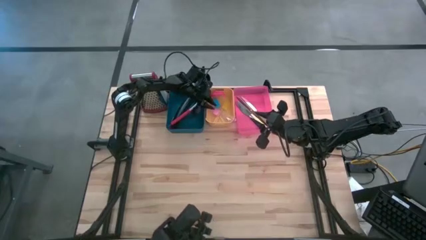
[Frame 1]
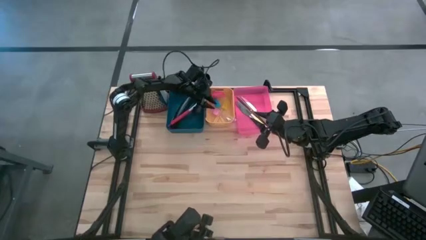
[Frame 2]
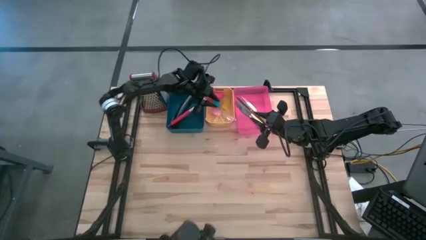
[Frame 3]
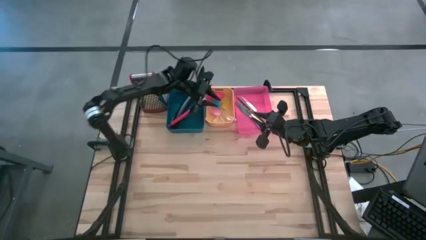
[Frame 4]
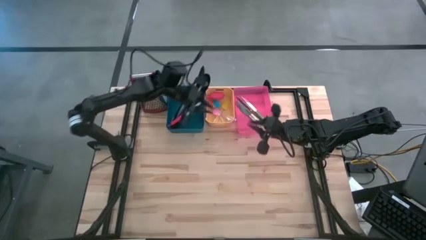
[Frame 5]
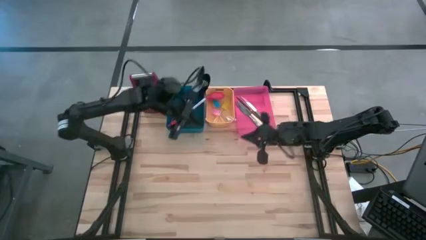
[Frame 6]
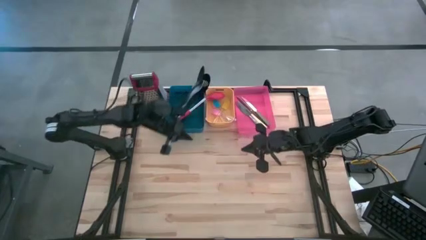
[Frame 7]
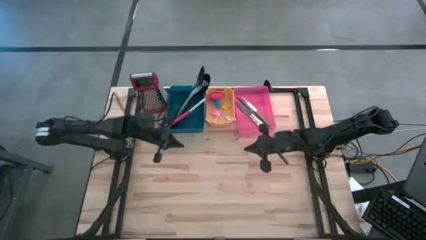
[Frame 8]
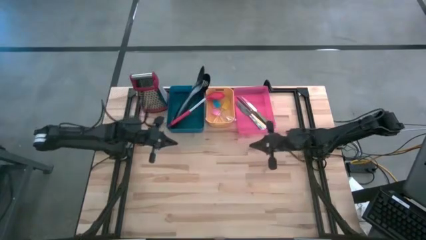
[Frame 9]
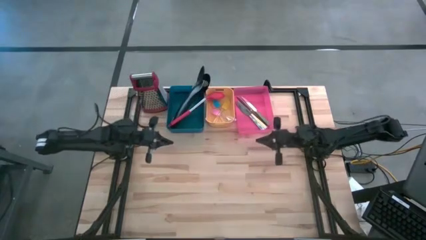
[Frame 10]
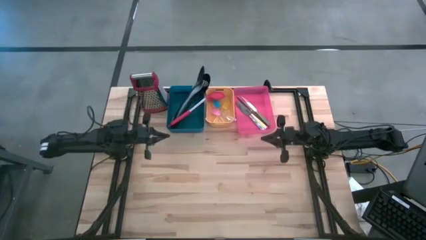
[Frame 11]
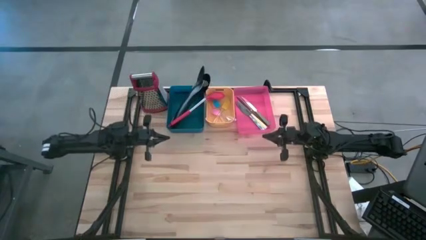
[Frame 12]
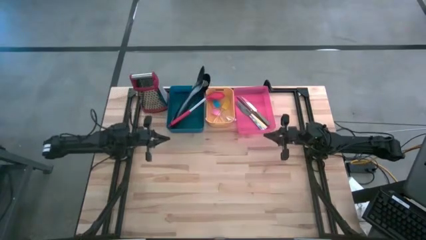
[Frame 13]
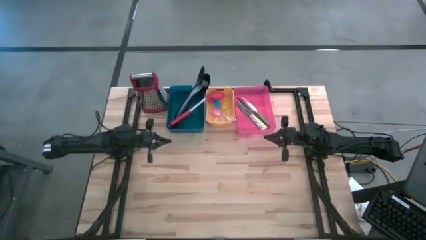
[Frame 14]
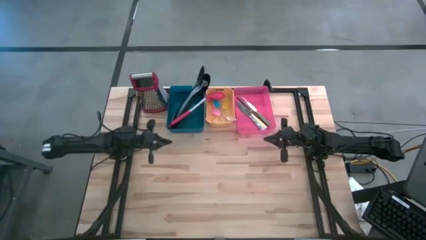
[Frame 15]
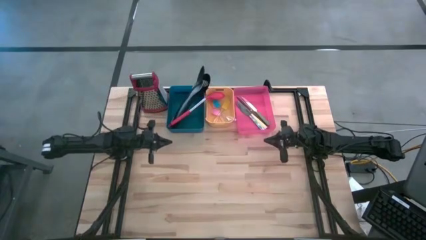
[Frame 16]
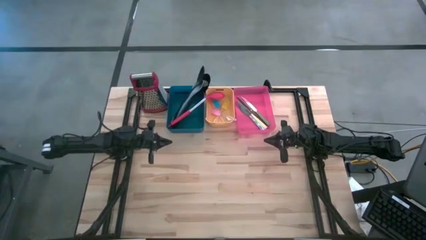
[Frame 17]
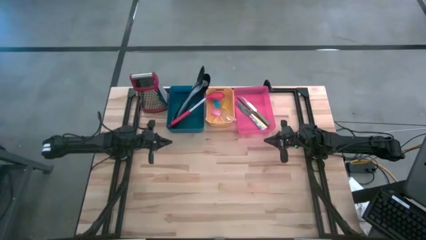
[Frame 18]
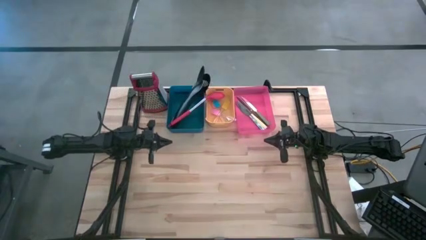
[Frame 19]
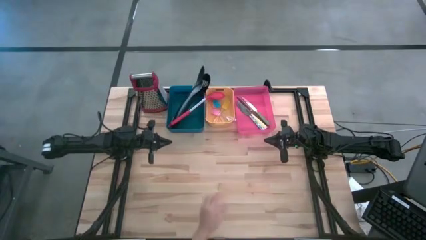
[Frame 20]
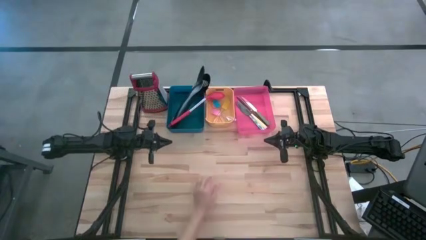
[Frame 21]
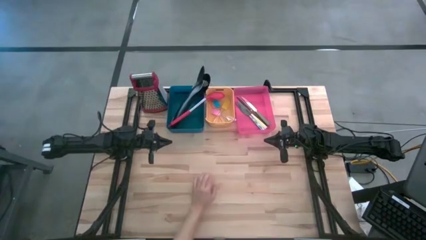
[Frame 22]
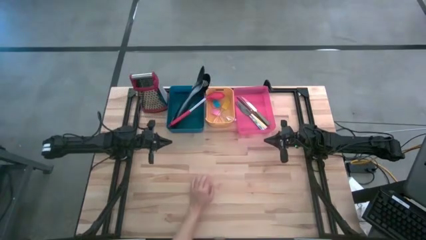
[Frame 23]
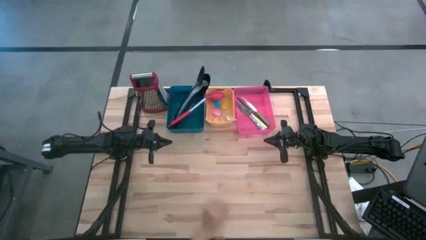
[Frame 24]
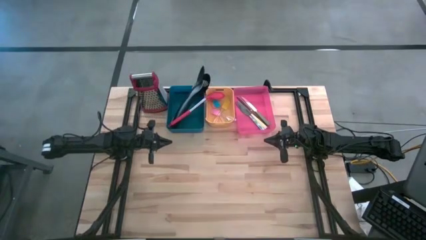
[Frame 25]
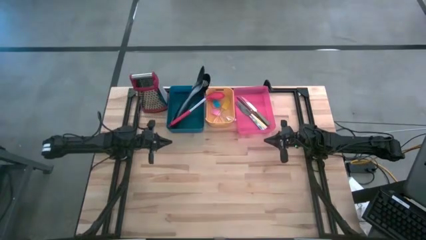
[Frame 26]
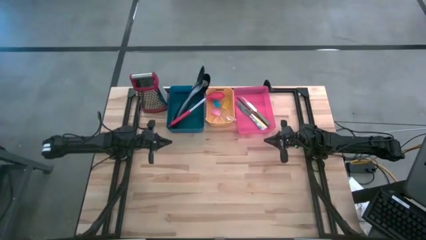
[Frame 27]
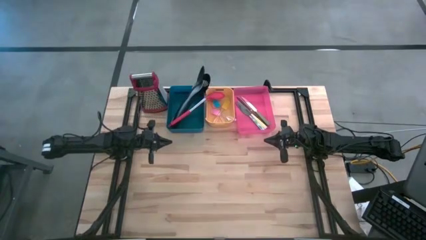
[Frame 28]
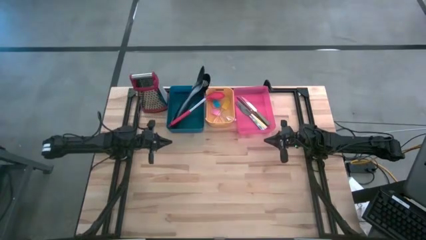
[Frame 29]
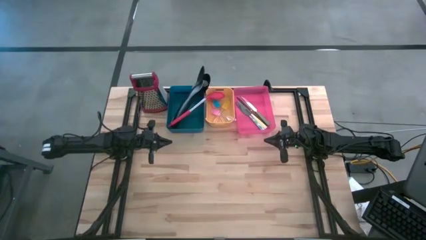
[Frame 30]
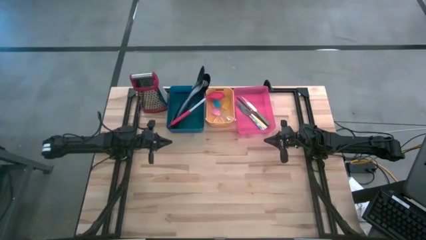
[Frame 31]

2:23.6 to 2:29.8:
Task: Pick & Place Kitchen Items
Return to Home Position

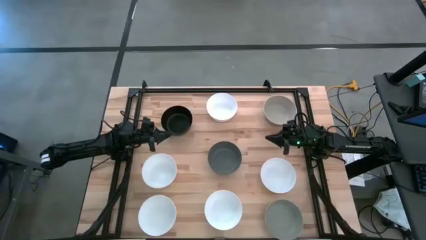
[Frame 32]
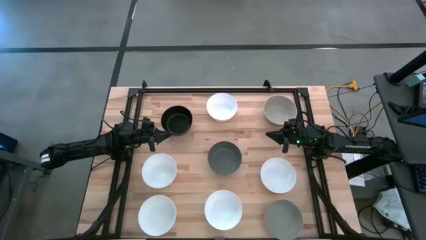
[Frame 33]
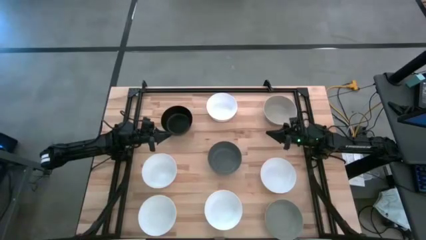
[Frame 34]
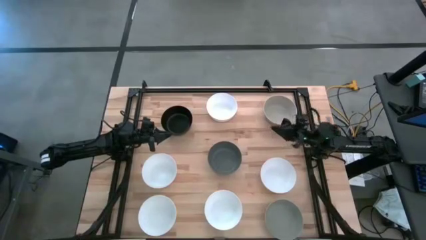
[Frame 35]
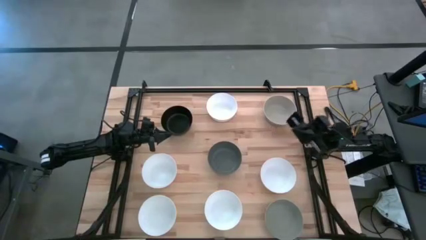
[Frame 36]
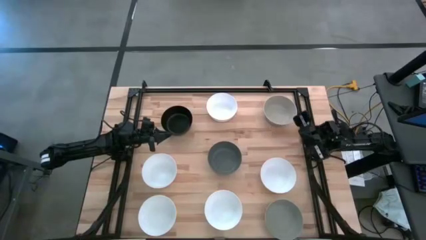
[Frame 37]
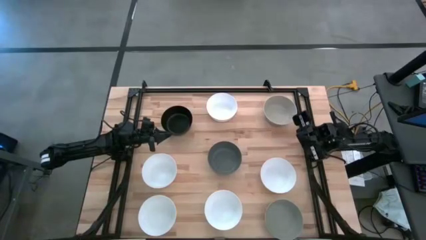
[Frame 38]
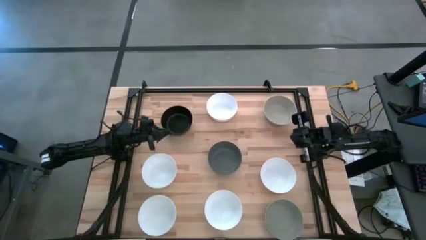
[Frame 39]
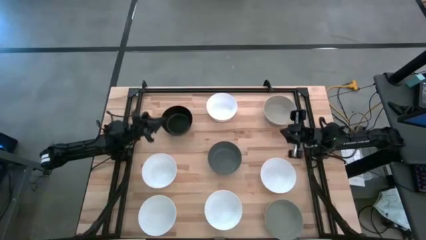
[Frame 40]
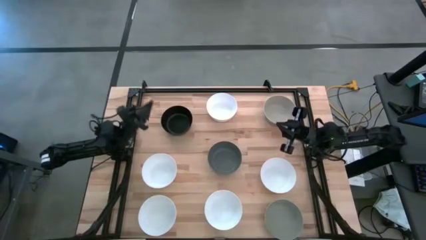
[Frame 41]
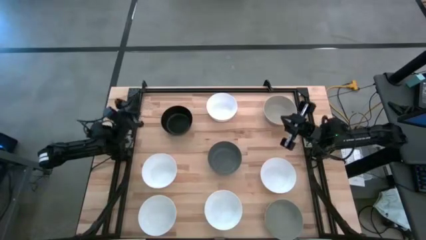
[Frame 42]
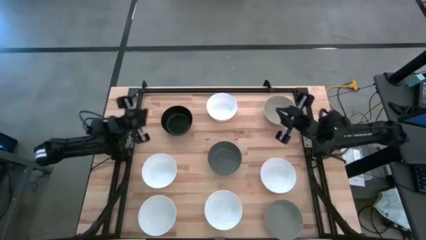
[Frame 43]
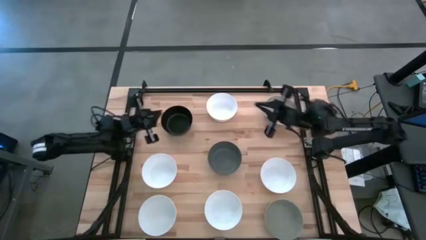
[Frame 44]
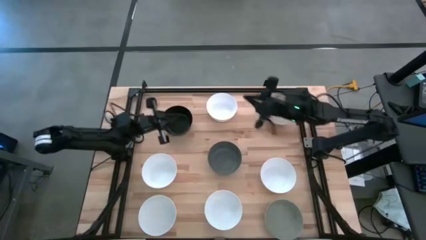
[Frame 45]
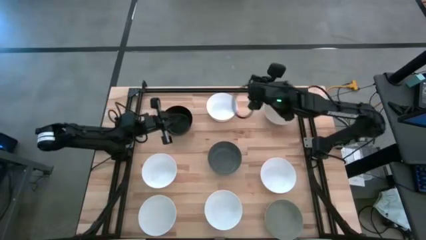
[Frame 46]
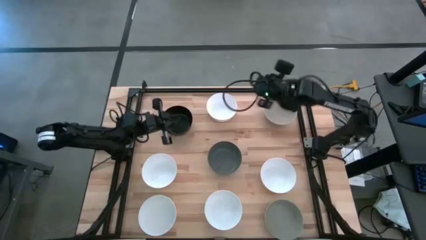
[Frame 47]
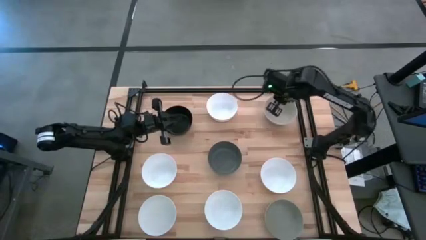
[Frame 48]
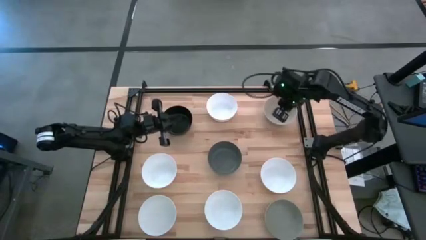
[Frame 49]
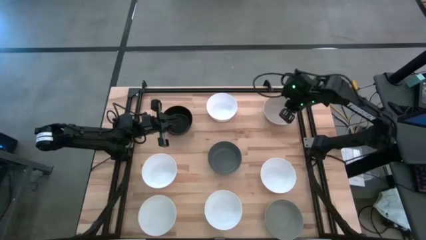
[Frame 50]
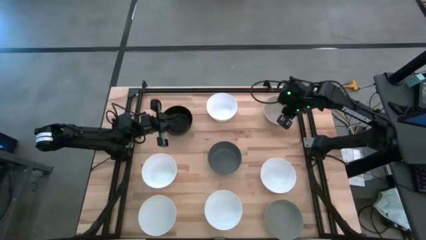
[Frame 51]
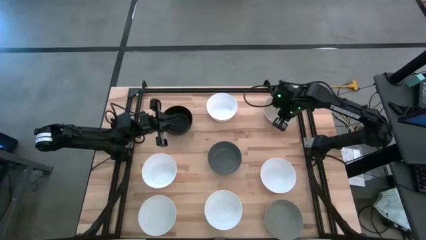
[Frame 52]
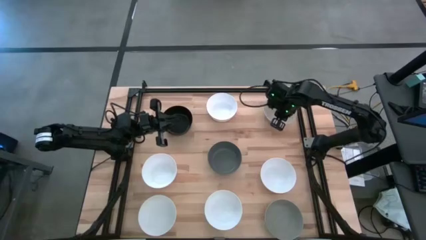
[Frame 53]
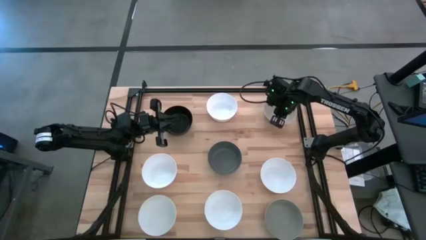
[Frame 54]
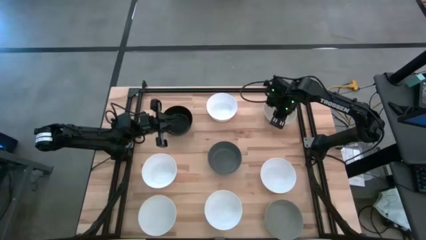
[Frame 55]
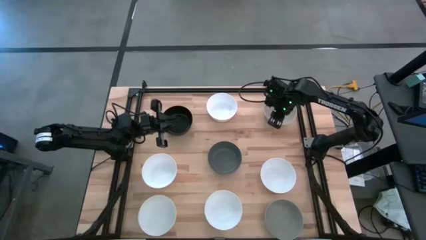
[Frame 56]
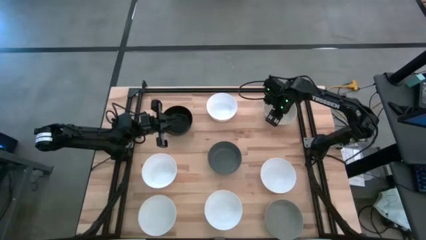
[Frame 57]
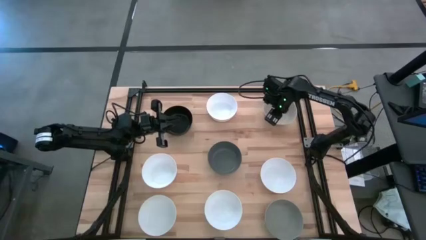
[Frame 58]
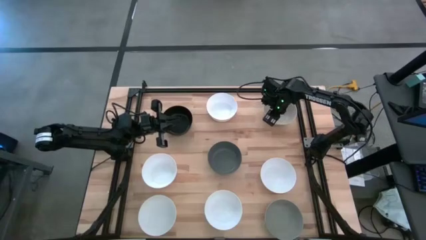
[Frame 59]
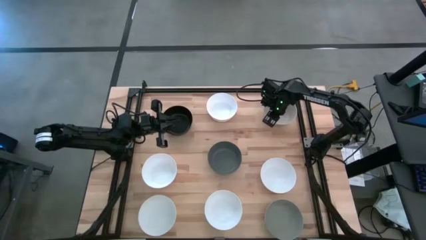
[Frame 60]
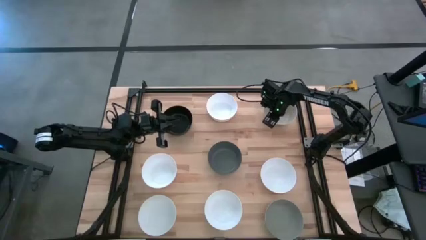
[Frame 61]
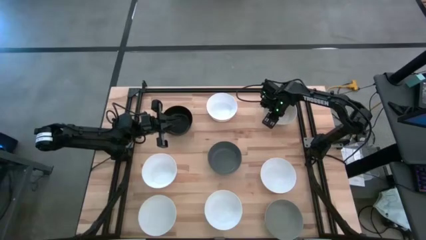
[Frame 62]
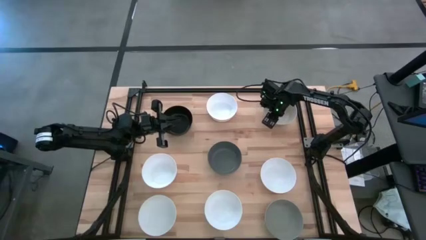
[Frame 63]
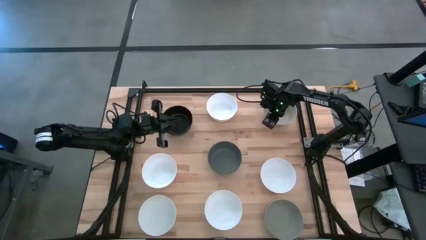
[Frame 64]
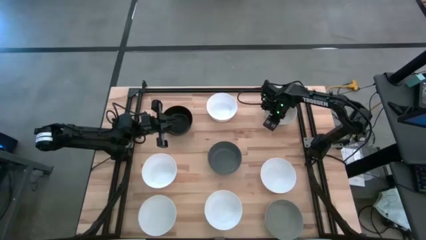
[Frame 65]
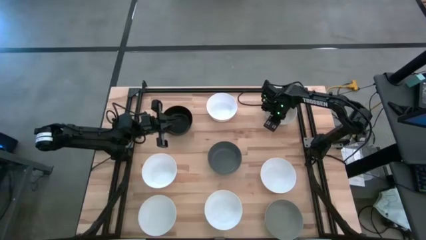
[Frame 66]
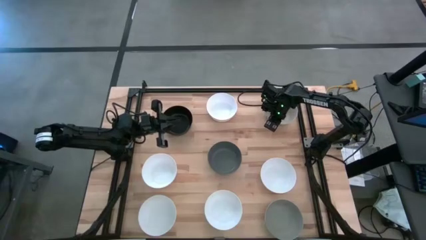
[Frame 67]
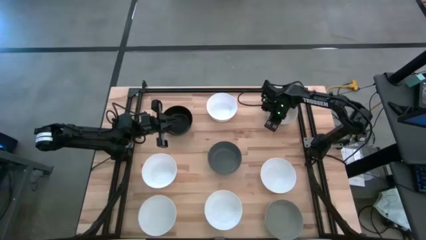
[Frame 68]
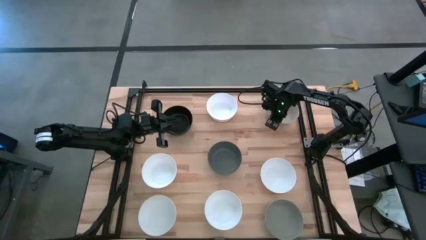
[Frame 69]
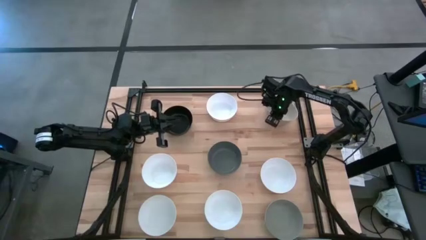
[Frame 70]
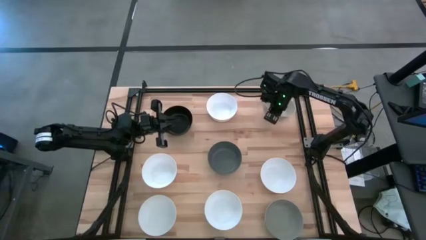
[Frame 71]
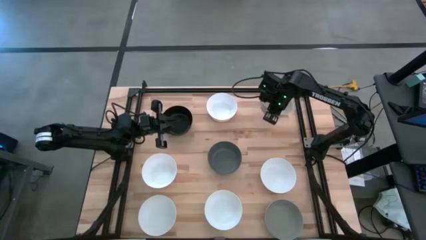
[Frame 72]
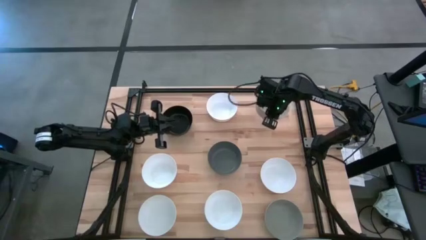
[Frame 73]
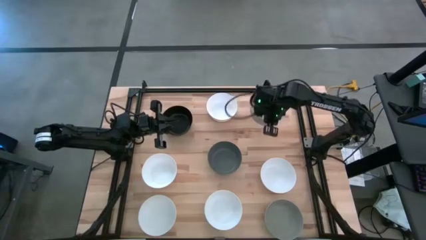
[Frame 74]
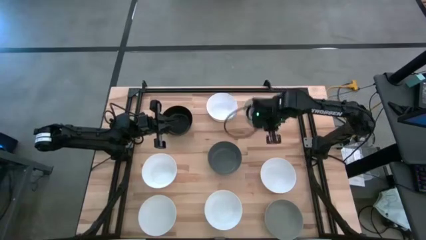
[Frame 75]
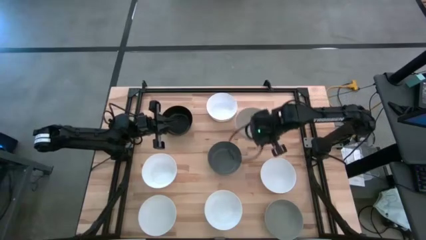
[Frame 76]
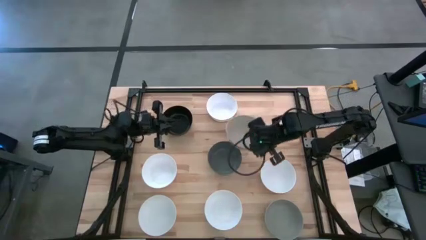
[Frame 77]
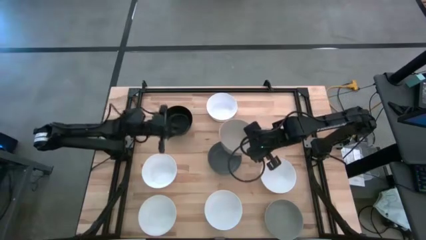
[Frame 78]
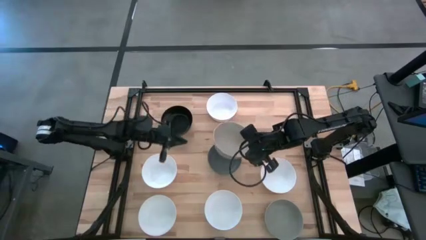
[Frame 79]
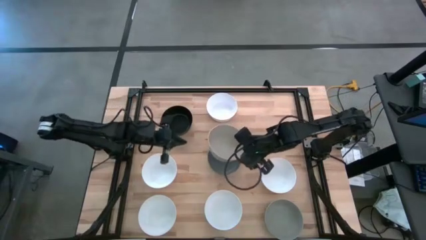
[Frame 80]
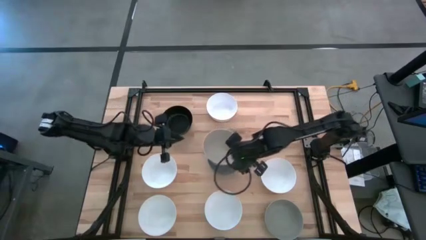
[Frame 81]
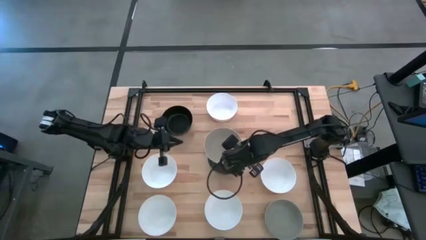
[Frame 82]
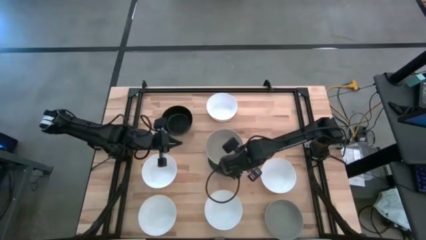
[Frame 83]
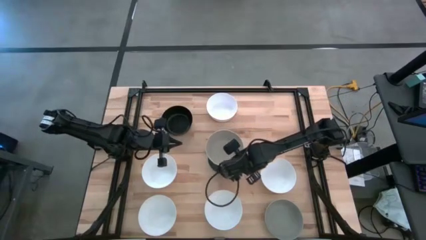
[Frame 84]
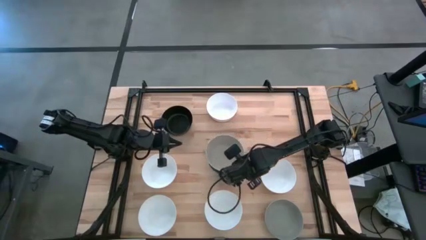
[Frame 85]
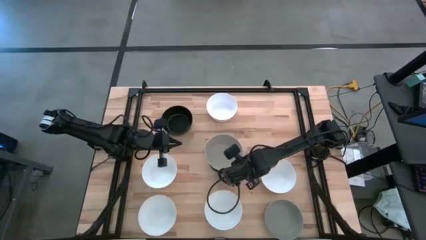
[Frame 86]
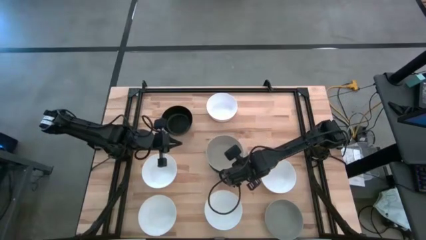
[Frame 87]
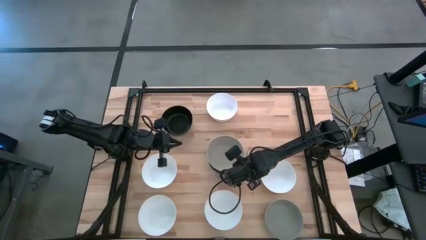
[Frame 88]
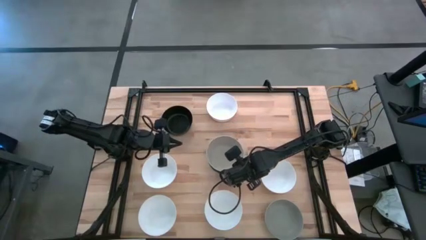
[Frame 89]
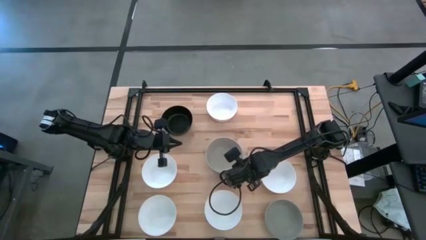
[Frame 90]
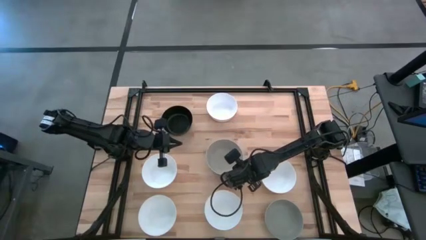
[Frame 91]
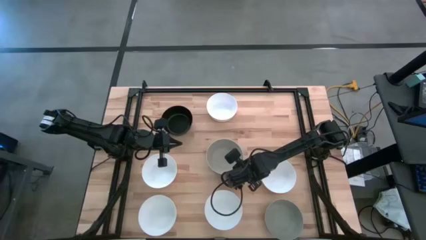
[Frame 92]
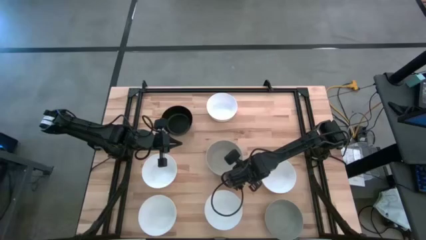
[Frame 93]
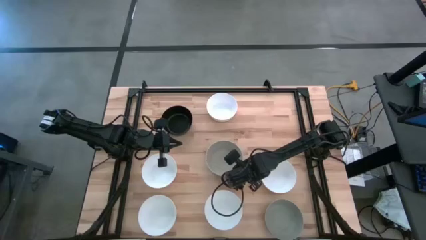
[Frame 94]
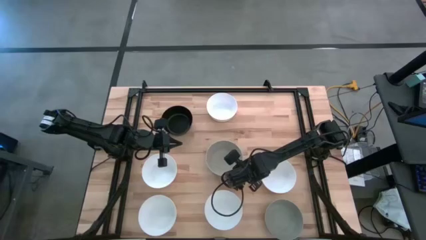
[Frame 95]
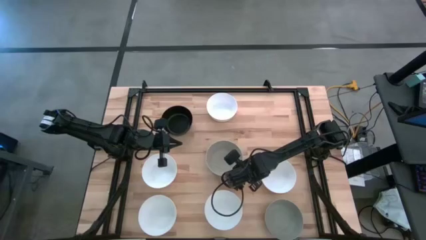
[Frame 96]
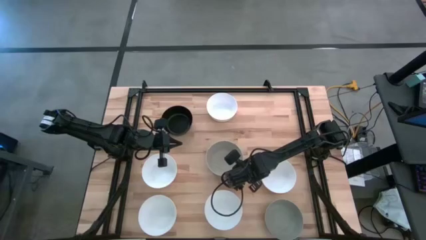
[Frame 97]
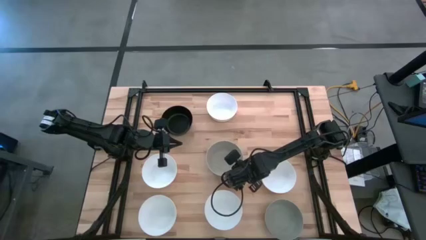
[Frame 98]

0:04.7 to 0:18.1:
Task: Nest bowls inside each other
Stack the light brown bowl on top of the dark gray bowl
